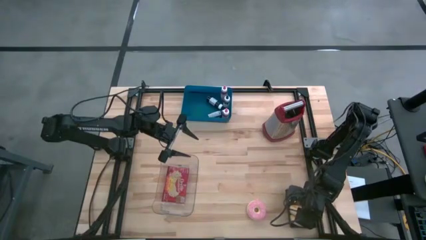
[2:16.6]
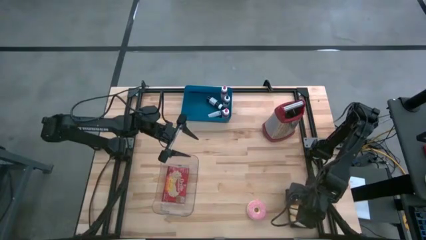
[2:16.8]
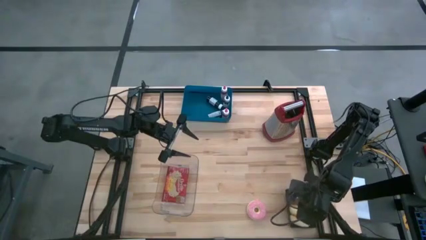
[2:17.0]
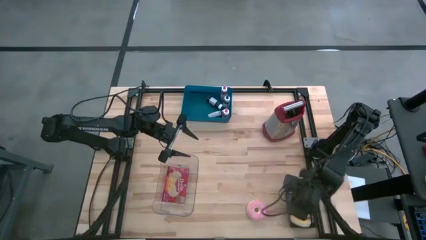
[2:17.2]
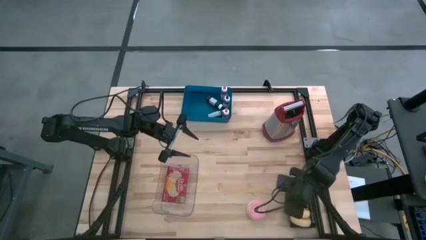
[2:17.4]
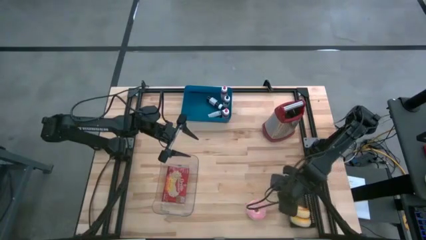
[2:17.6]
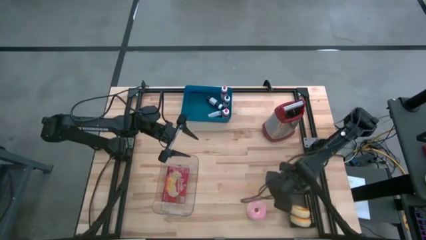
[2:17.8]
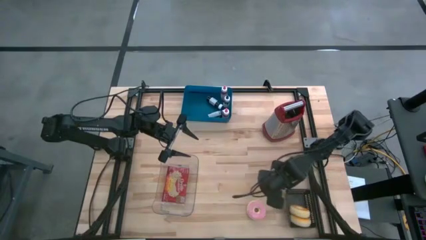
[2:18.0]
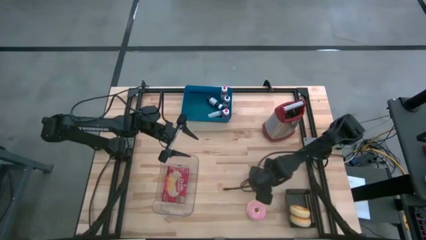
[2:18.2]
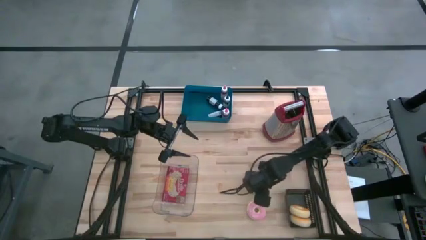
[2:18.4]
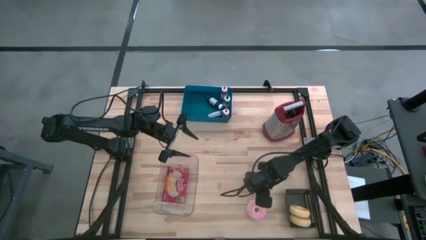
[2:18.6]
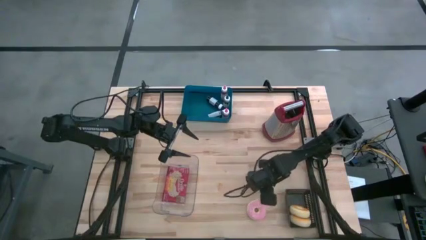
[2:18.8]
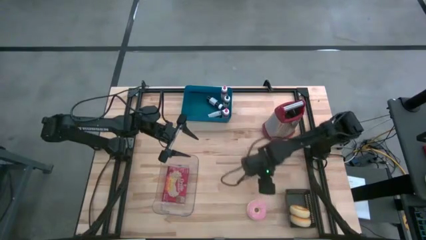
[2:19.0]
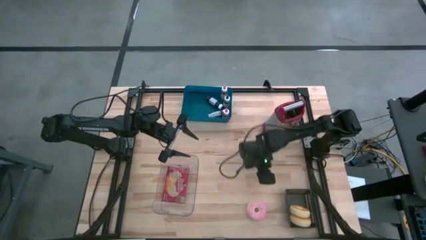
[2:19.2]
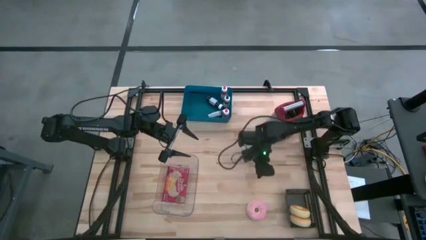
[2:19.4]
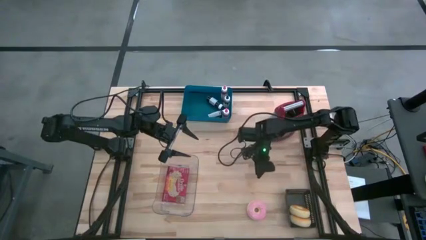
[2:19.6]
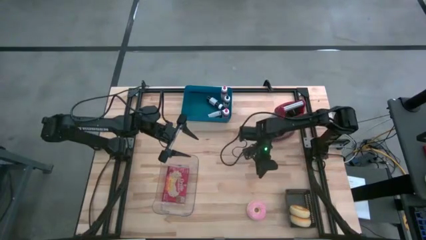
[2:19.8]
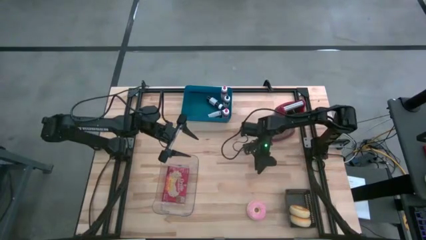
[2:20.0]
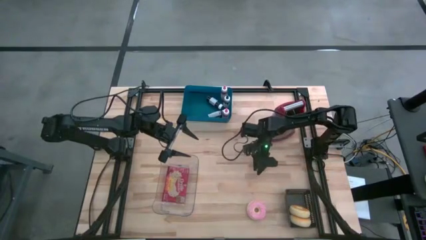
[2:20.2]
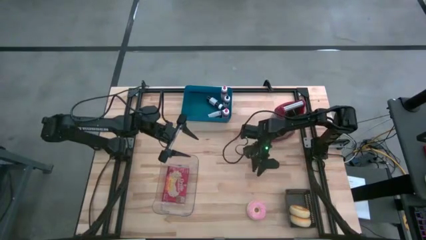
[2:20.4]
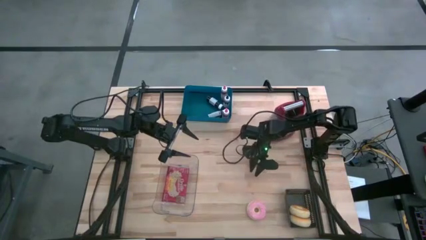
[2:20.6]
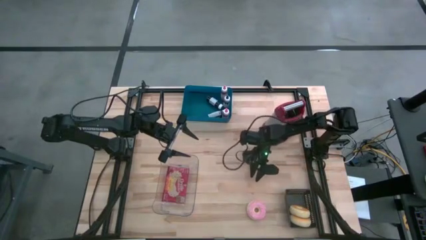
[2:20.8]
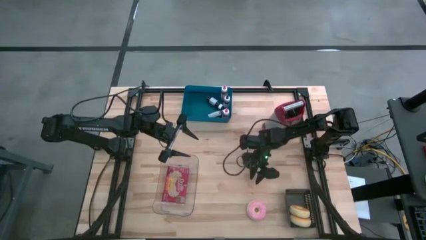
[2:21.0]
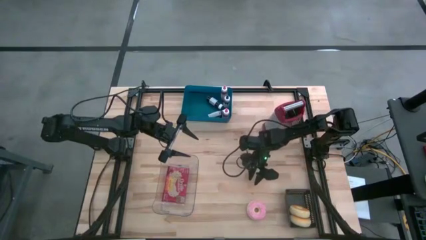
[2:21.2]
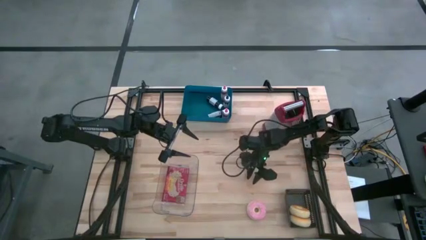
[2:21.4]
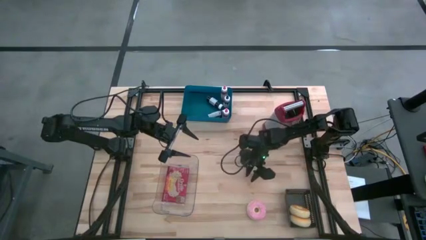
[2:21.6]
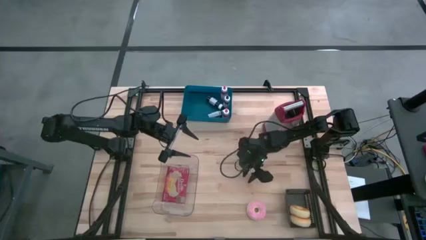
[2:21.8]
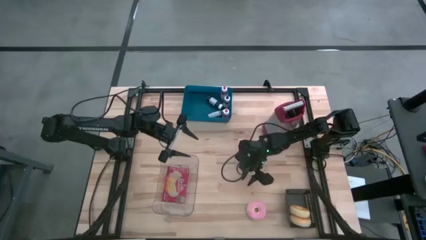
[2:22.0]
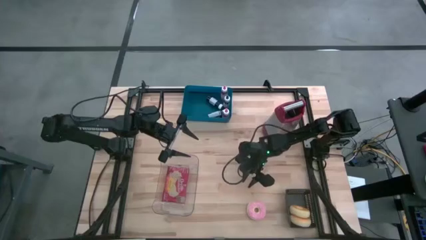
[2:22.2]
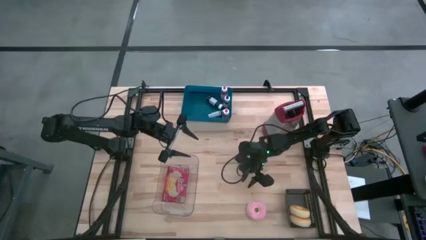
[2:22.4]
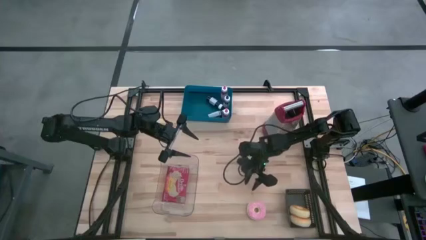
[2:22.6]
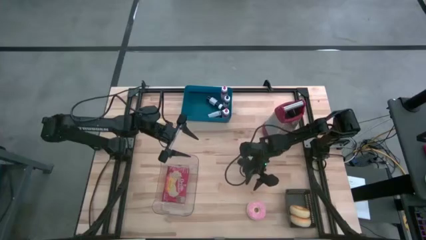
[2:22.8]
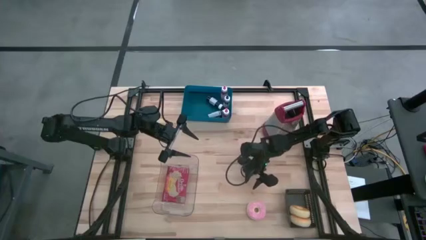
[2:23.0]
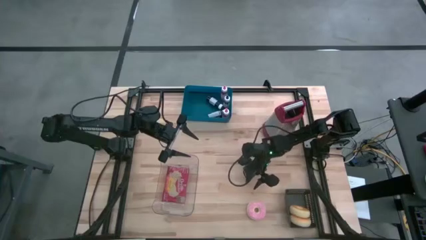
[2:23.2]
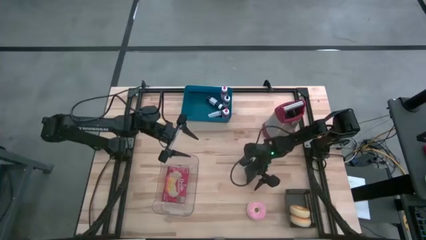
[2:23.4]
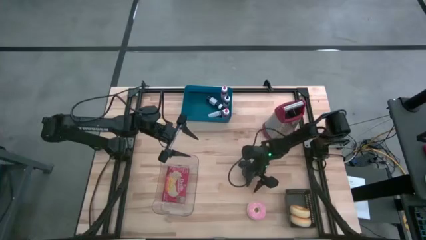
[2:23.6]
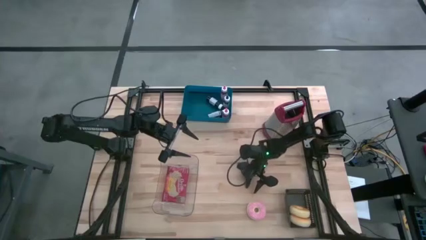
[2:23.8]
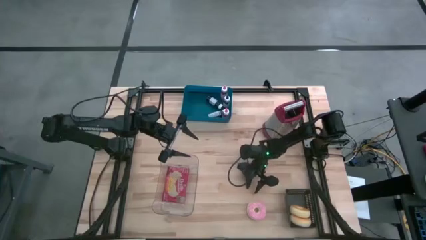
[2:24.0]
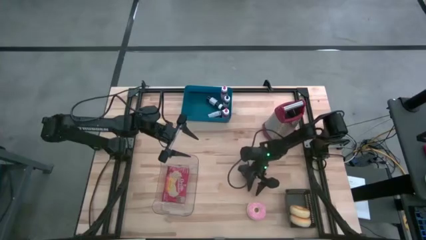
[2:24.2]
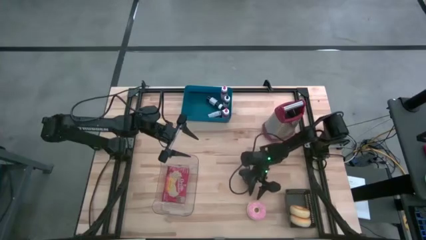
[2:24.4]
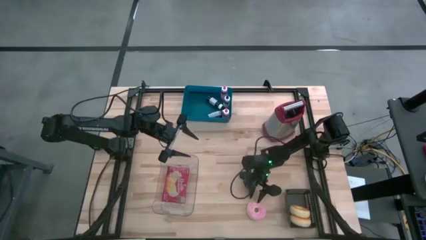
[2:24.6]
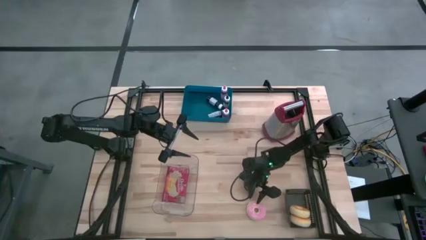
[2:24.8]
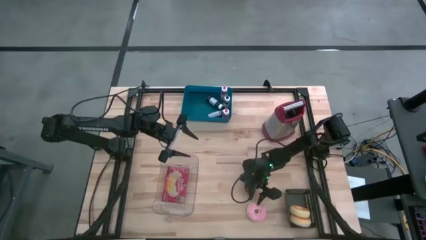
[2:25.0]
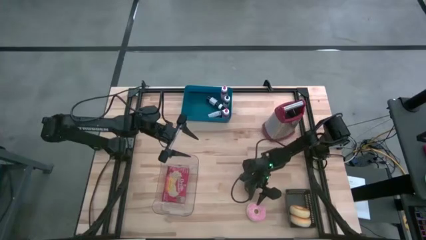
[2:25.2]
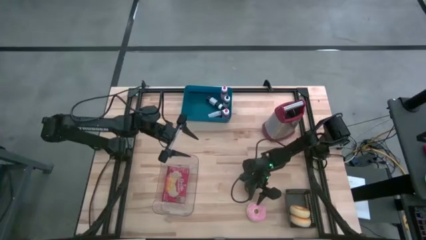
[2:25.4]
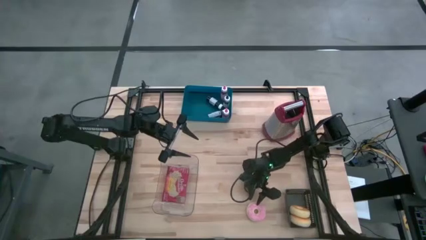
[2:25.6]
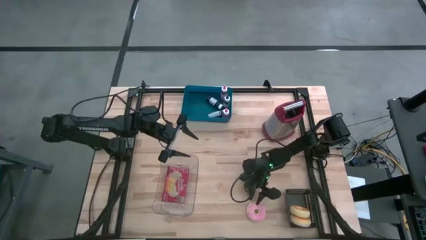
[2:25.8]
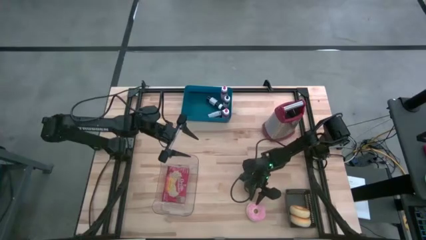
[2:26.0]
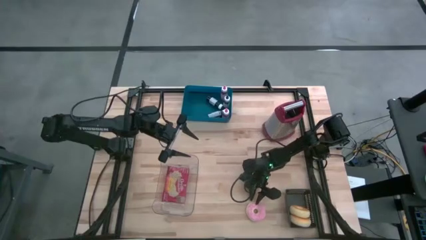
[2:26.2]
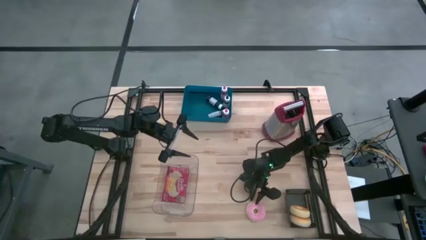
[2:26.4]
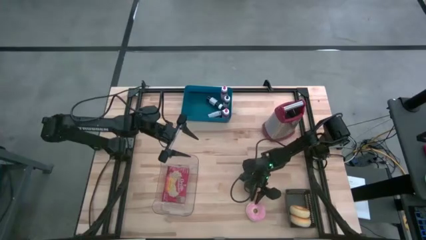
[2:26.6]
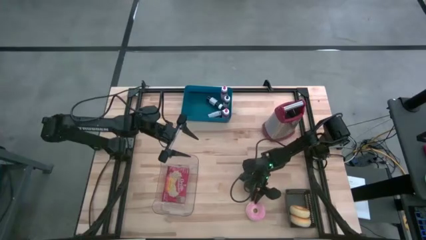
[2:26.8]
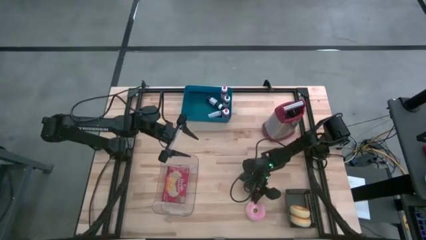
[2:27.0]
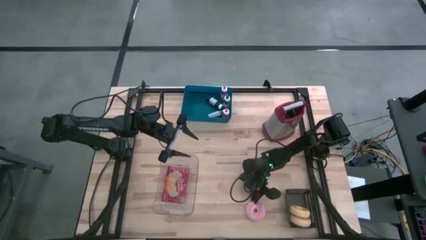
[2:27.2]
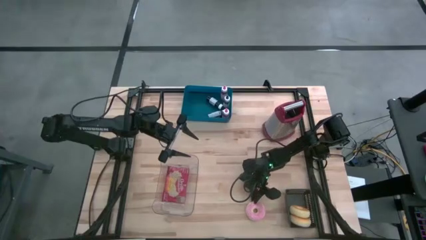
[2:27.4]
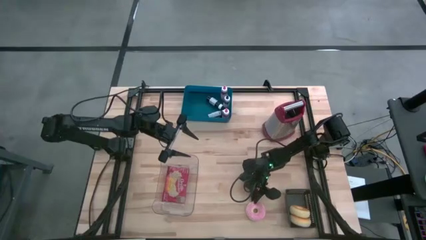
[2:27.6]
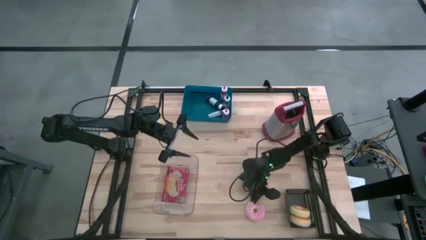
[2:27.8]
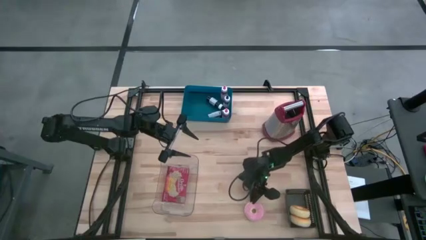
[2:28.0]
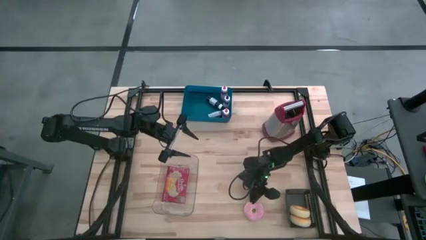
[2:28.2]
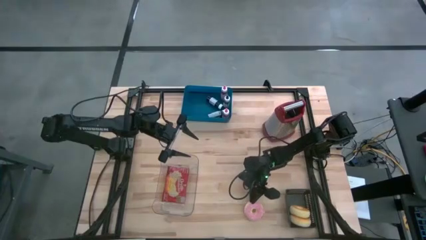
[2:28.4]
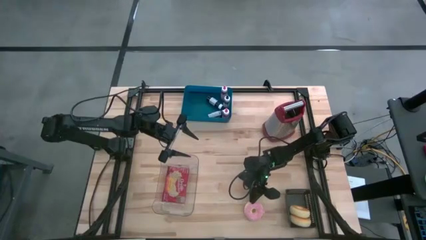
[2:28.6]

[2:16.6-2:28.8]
Task: Pick & Place Food Item
Put the pink donut into the black bin
